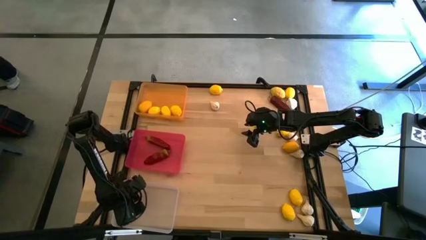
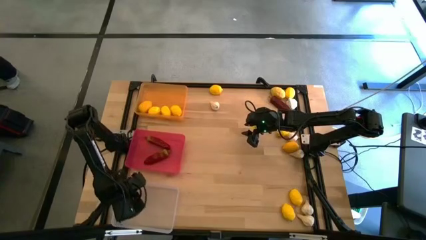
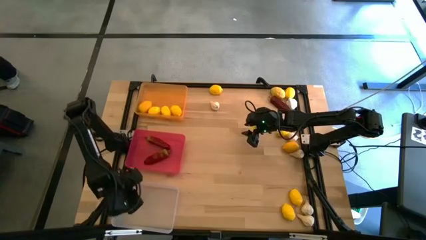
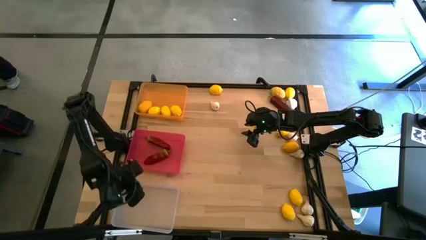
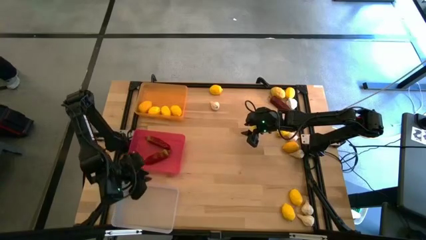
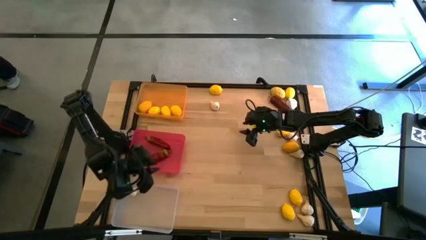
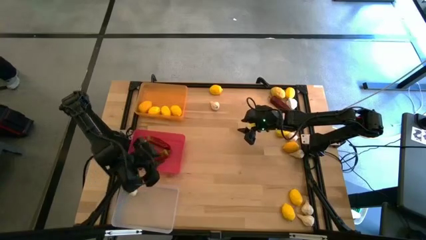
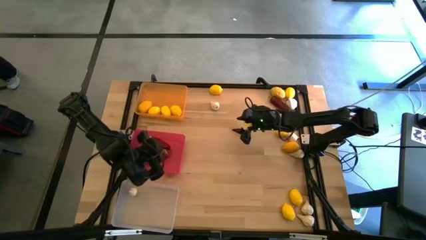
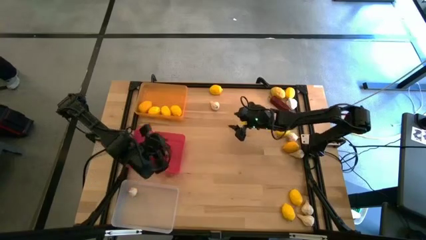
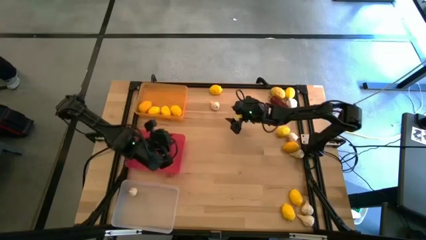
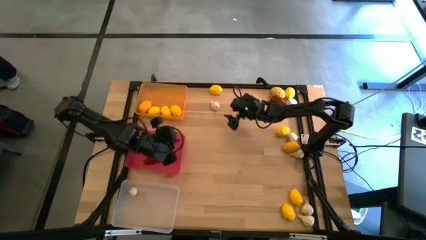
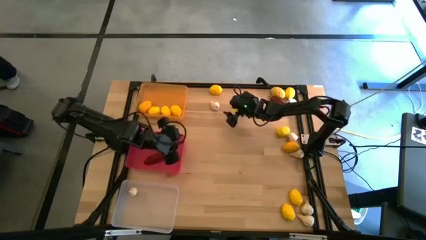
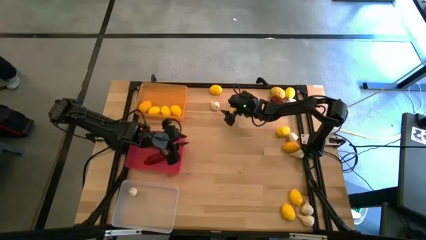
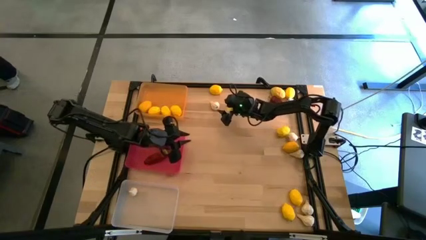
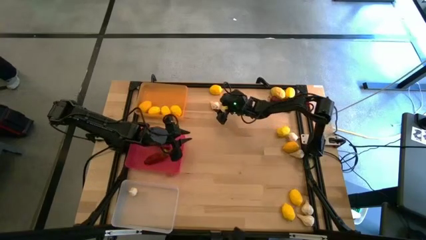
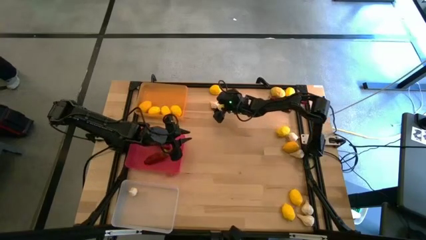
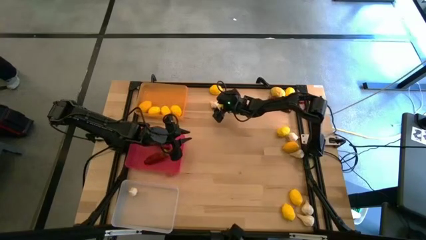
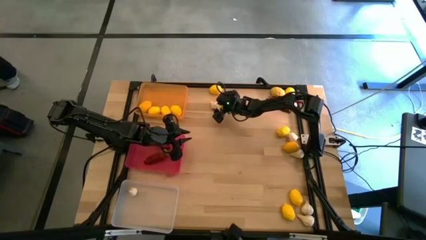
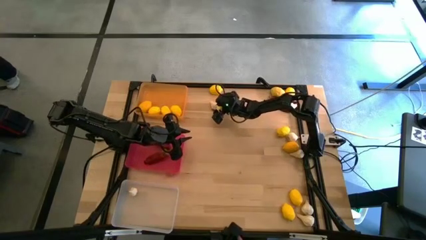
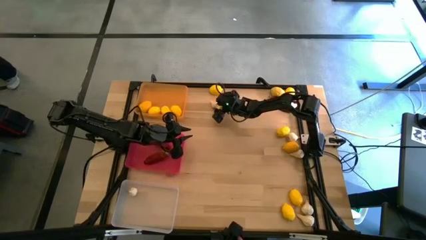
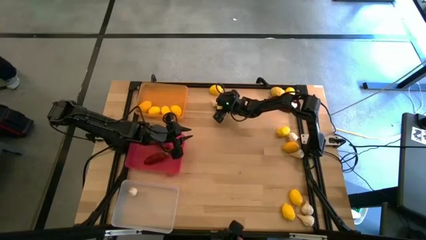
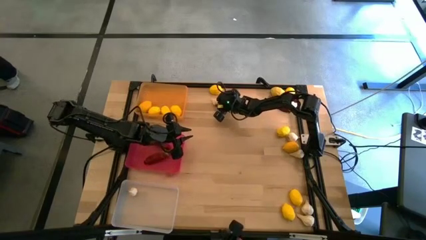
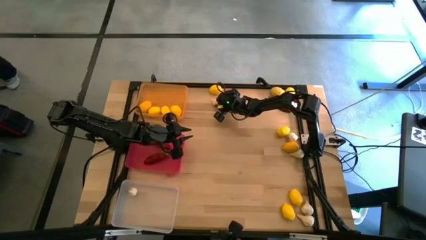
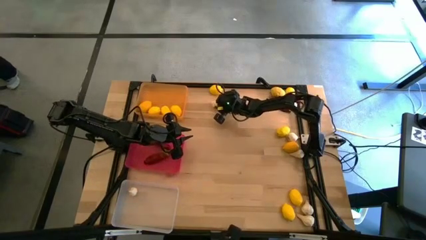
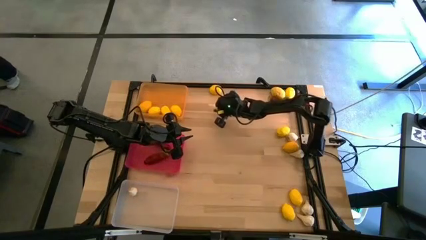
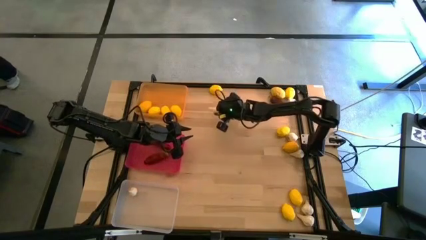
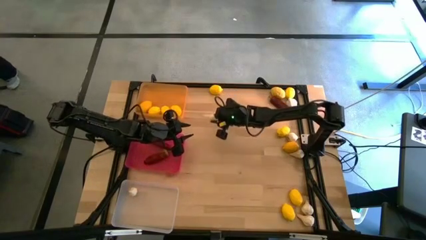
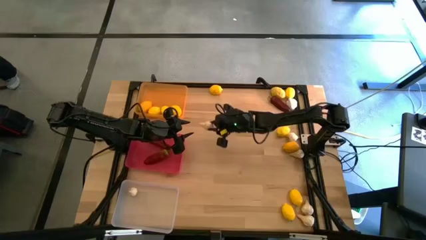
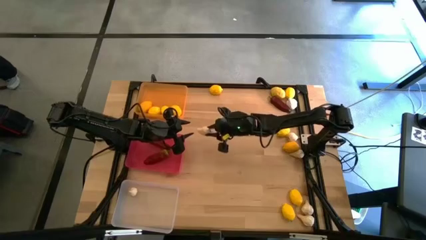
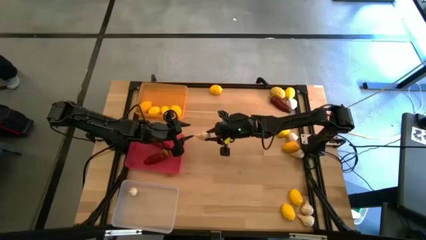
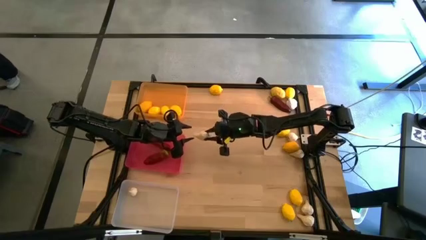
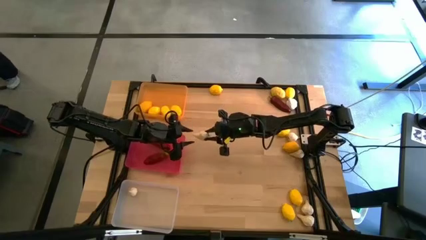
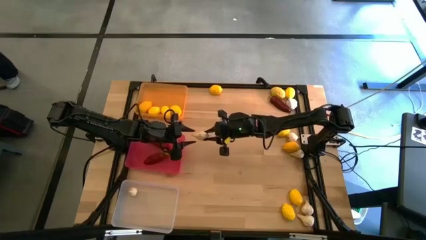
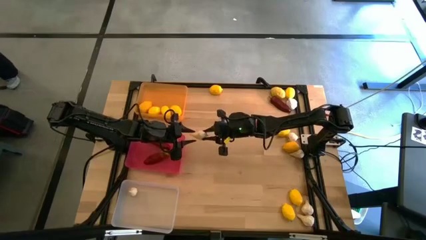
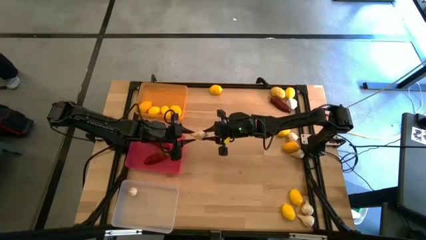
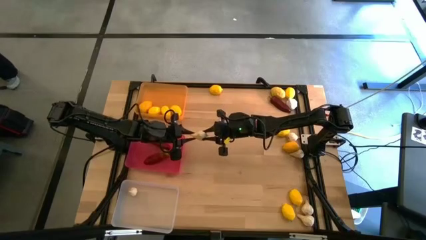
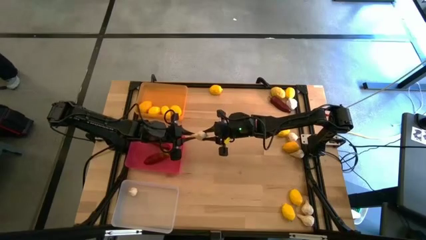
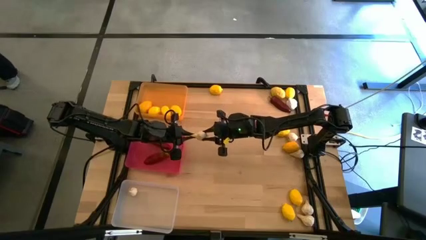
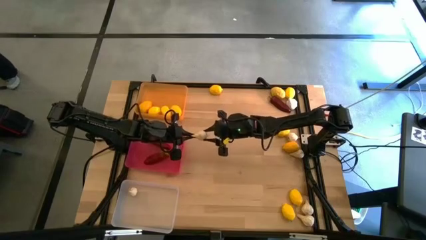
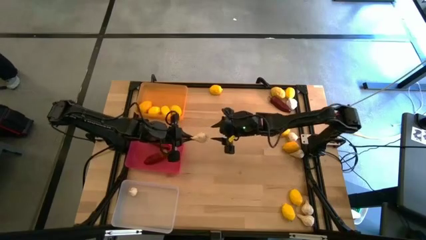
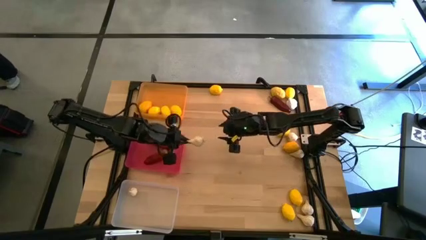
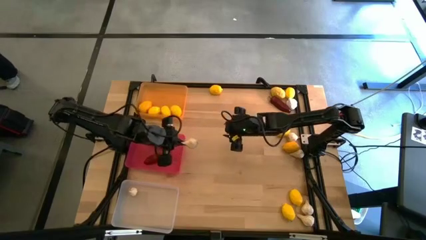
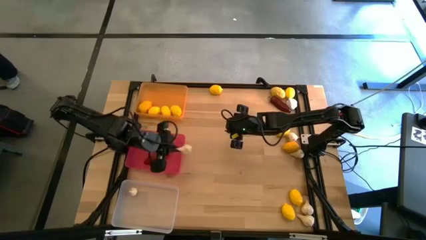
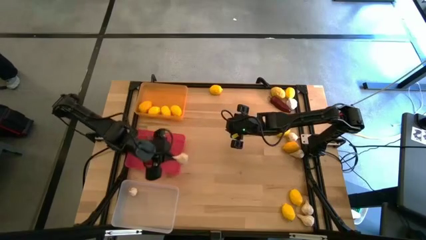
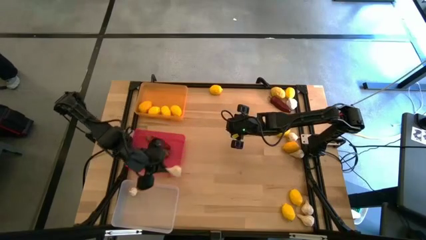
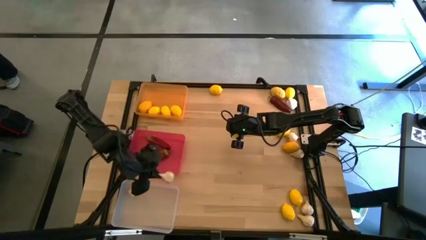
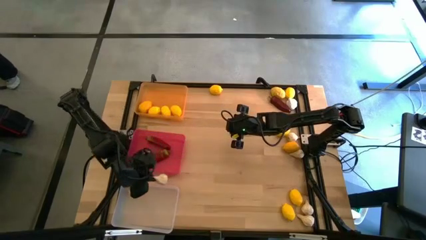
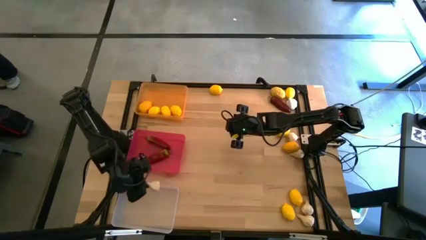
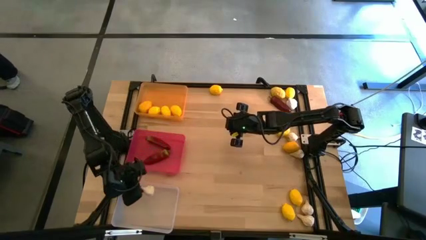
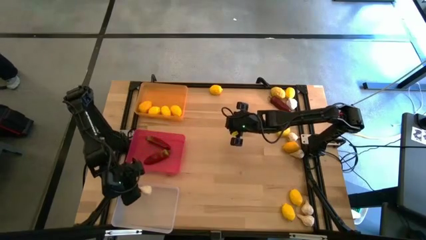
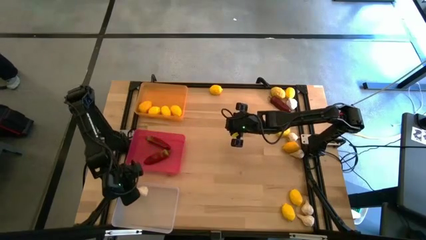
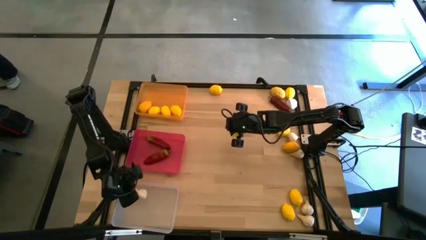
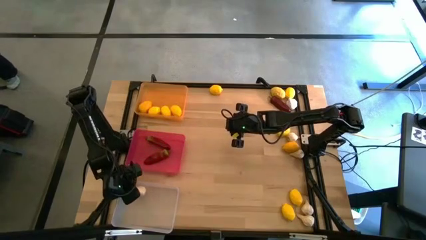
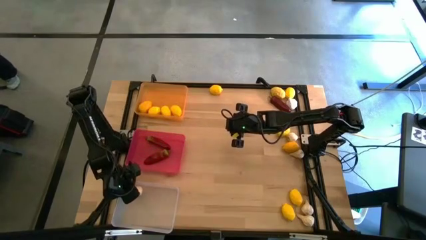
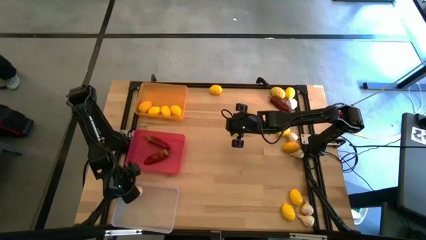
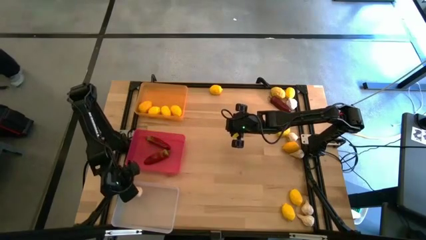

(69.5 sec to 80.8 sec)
Task: Sort produce into baskets
Put the garlic into the transparent bin

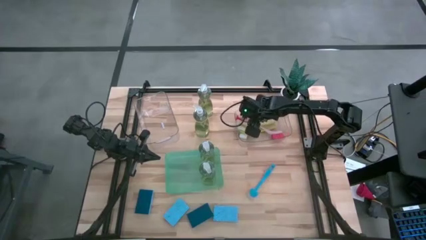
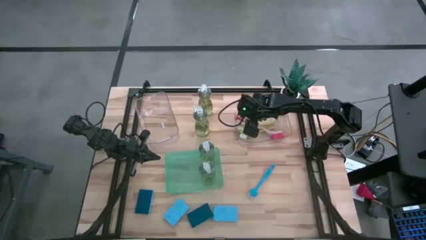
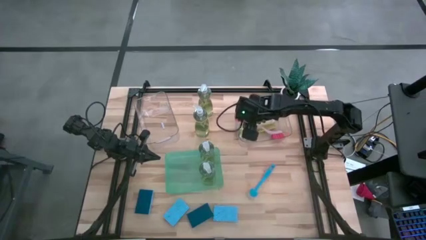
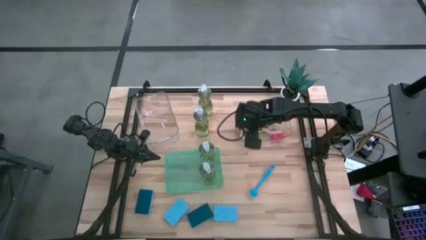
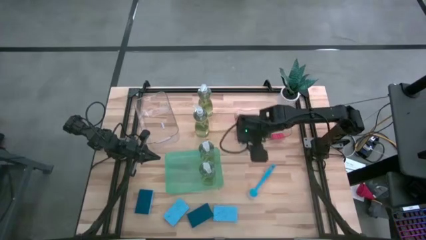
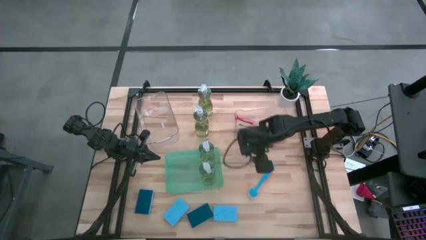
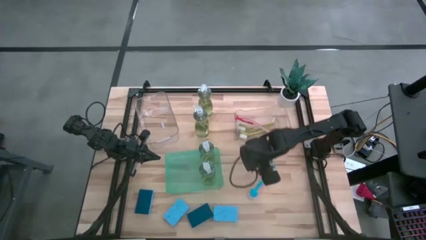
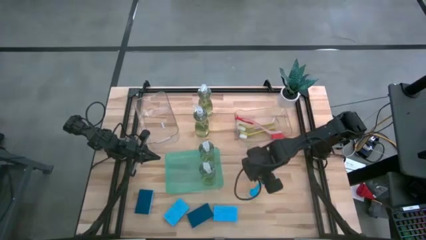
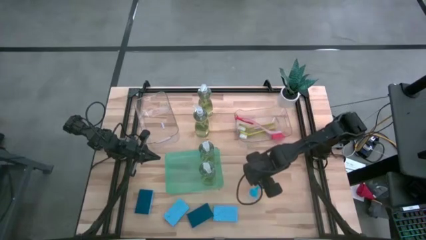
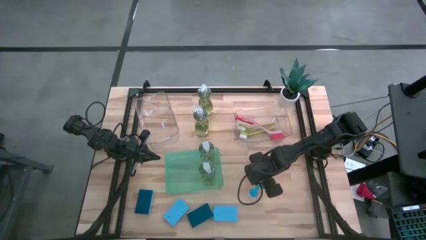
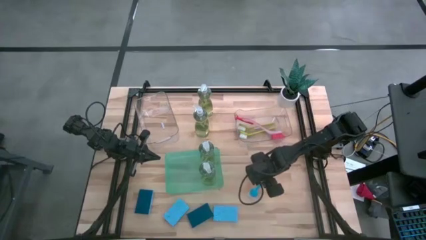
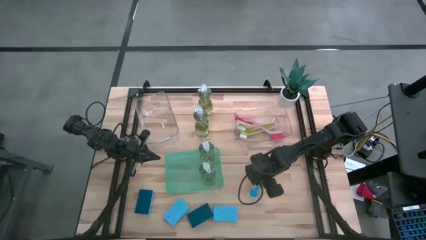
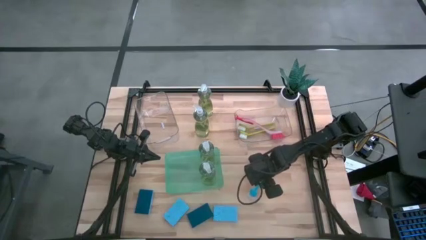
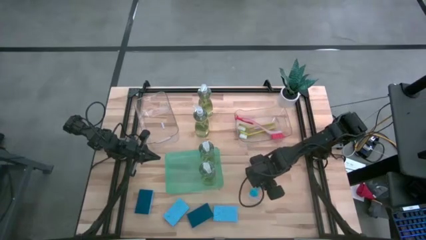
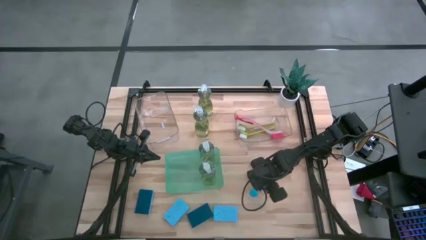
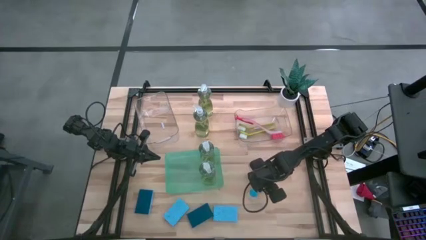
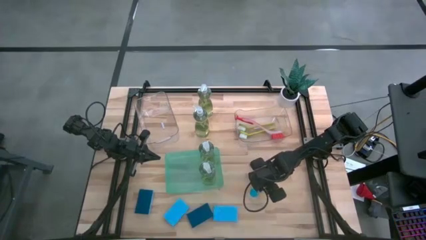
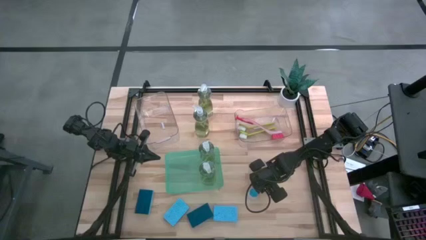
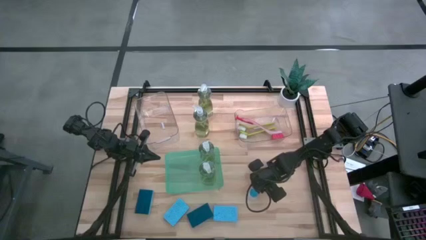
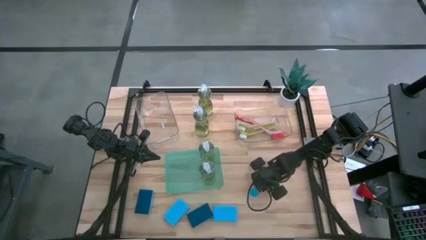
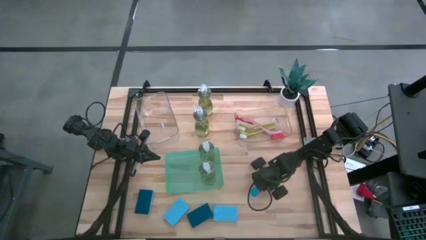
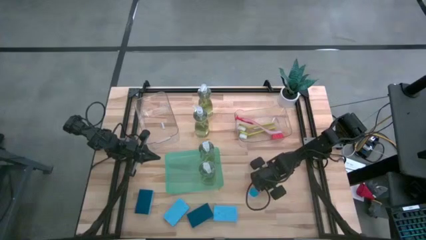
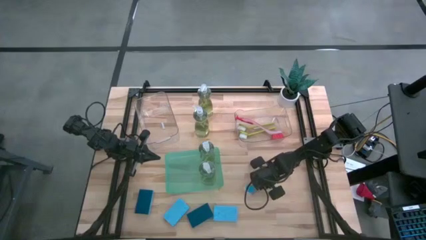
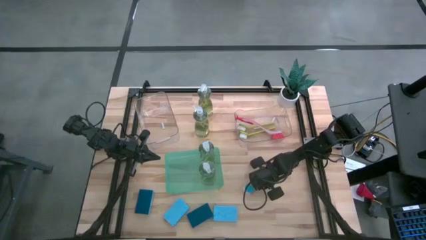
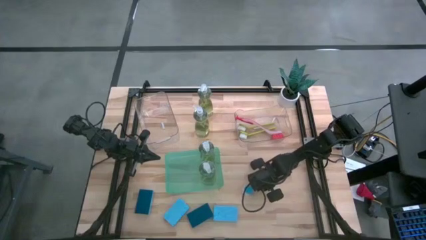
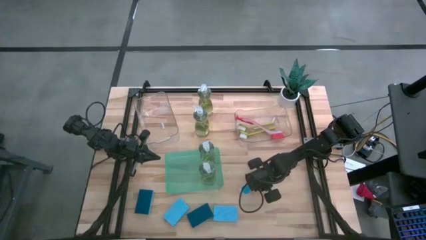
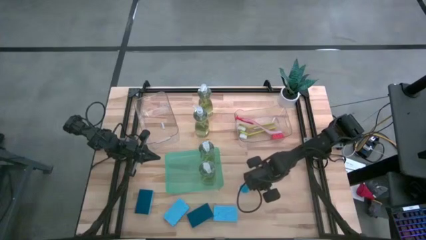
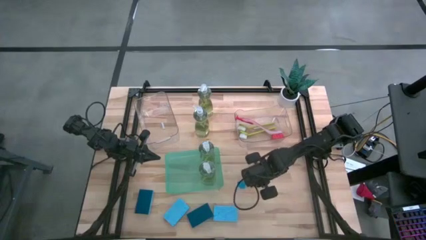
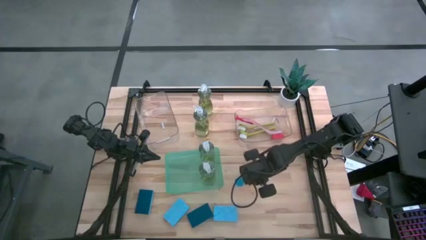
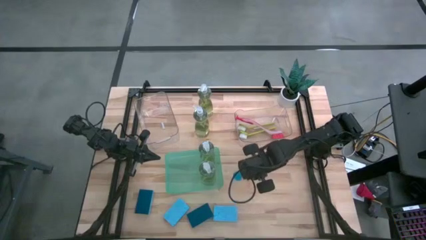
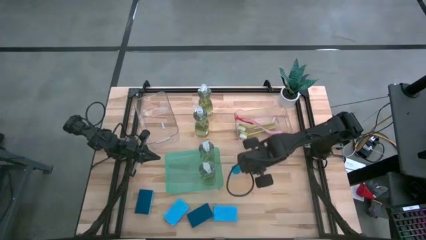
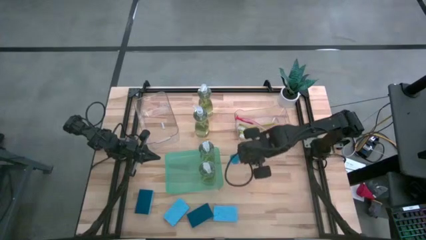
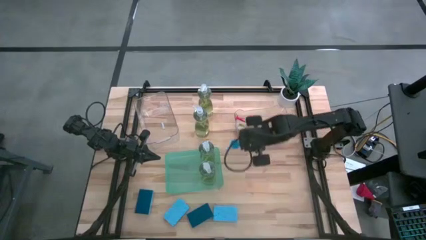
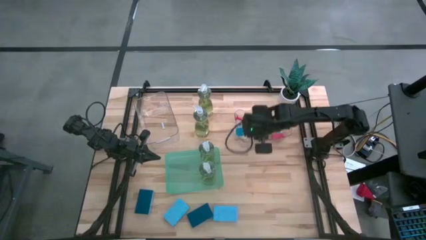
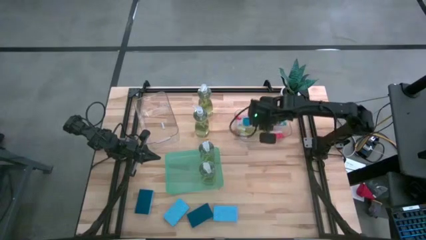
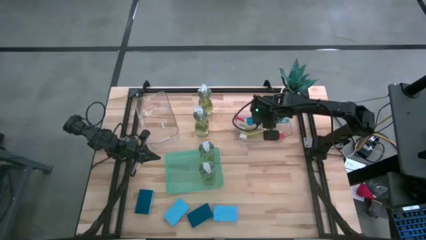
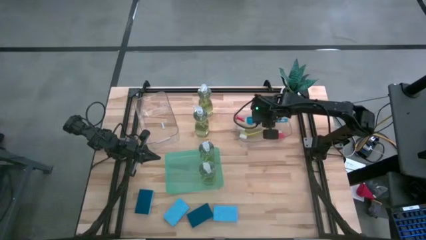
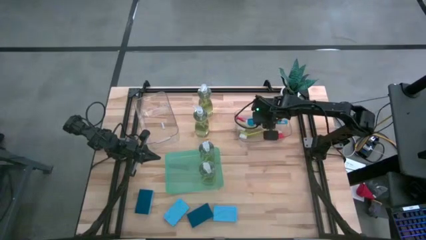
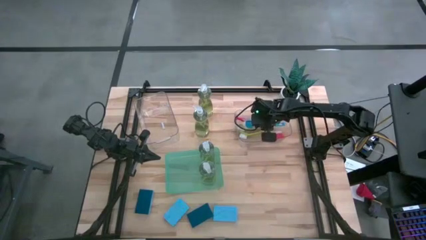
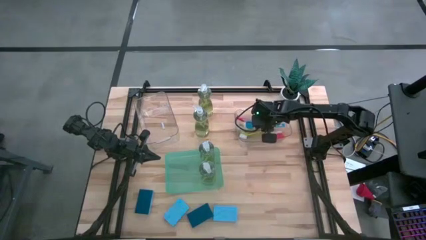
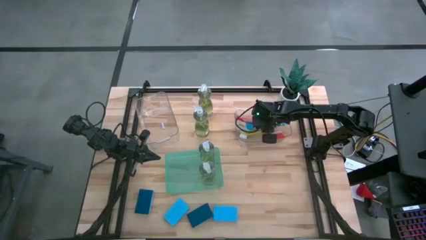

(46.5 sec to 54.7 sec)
Task: Pick & Place Kitchen Sink Supplies
Put the blue dish brush into the right transparent bin
